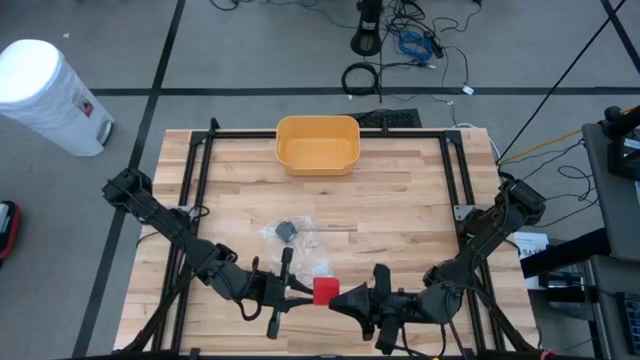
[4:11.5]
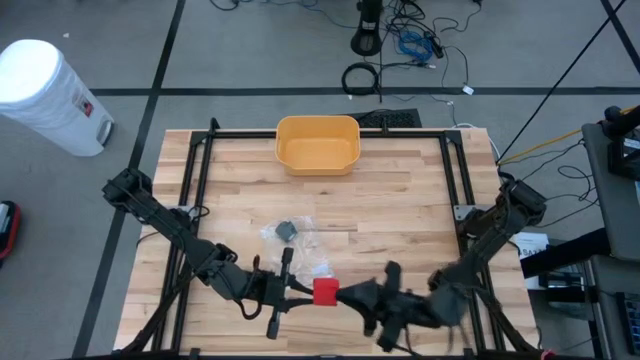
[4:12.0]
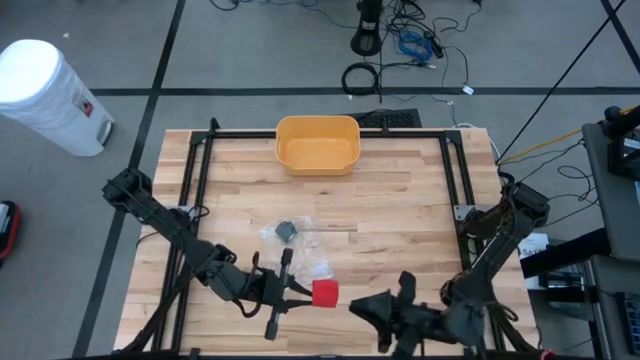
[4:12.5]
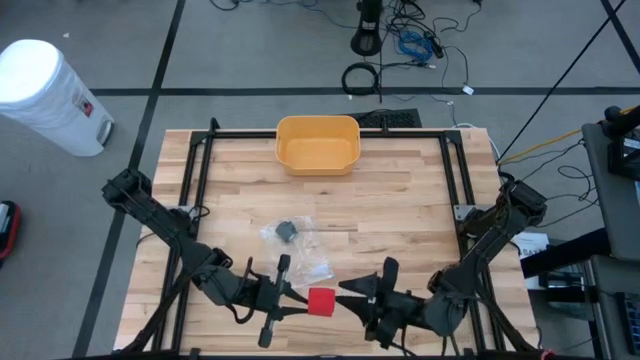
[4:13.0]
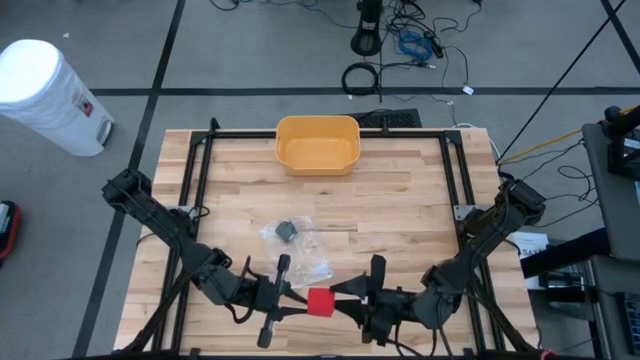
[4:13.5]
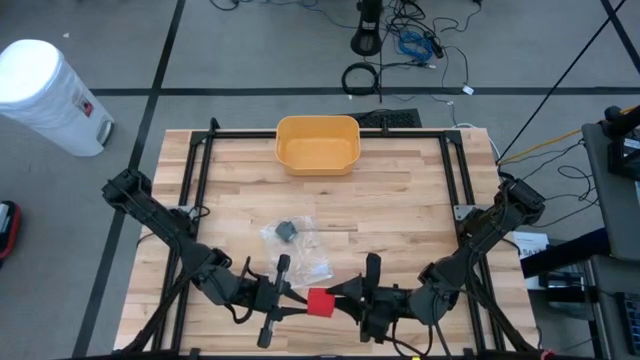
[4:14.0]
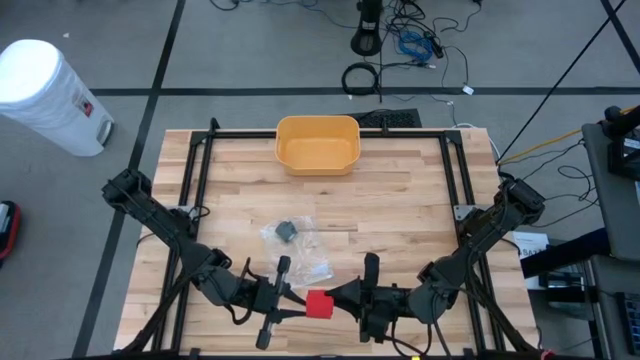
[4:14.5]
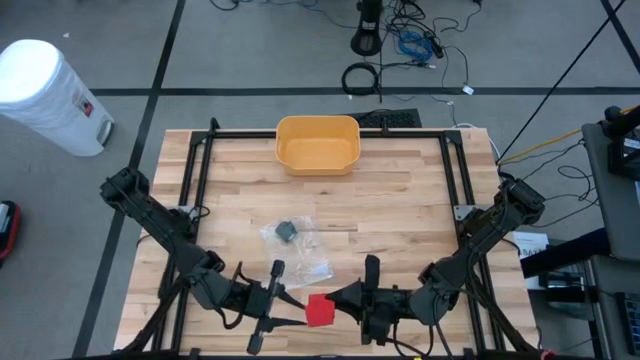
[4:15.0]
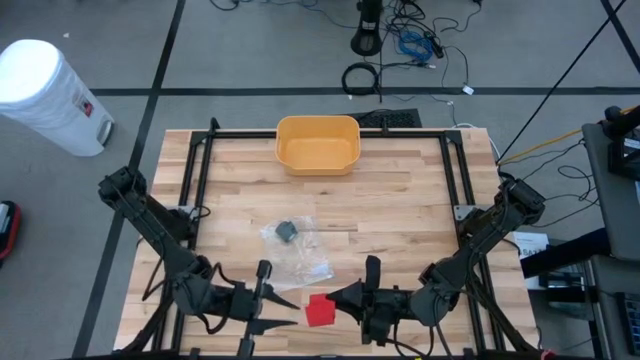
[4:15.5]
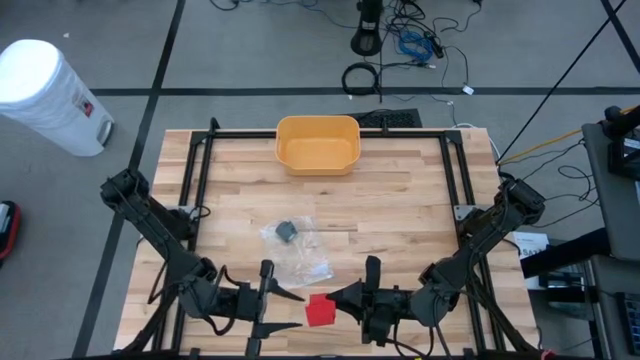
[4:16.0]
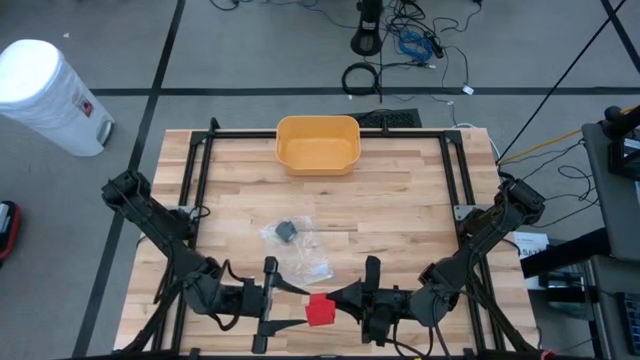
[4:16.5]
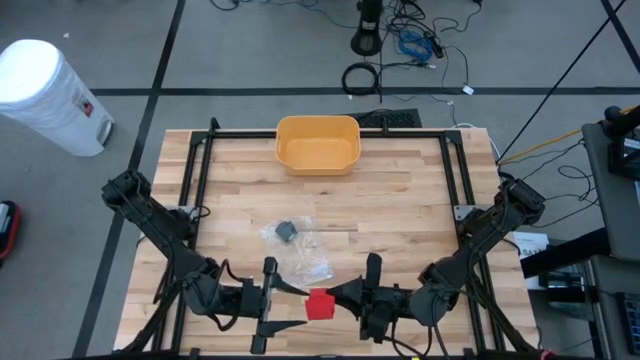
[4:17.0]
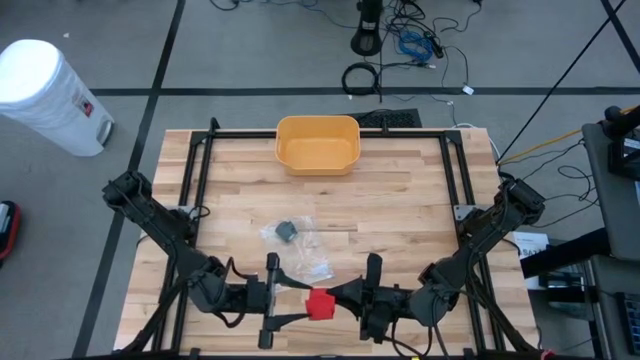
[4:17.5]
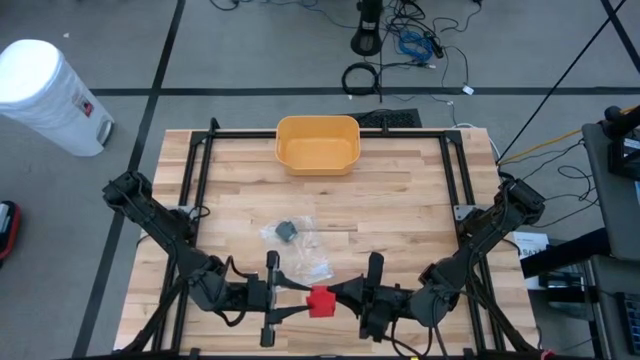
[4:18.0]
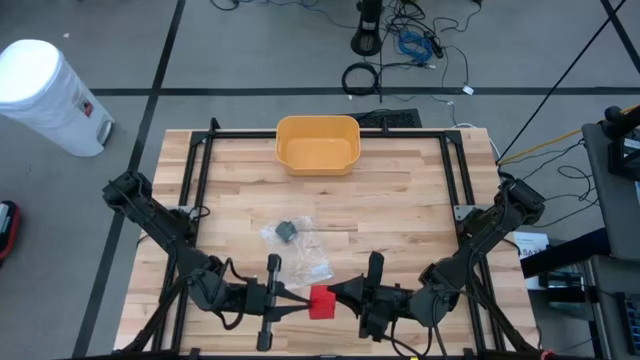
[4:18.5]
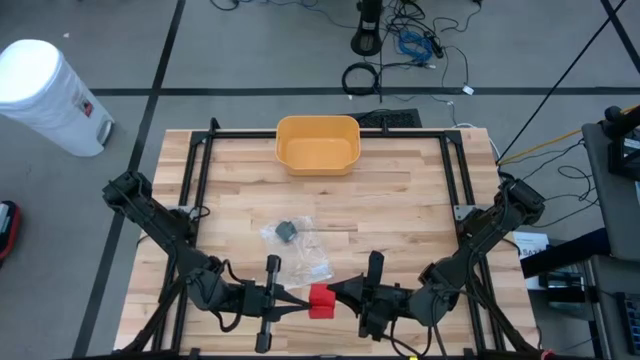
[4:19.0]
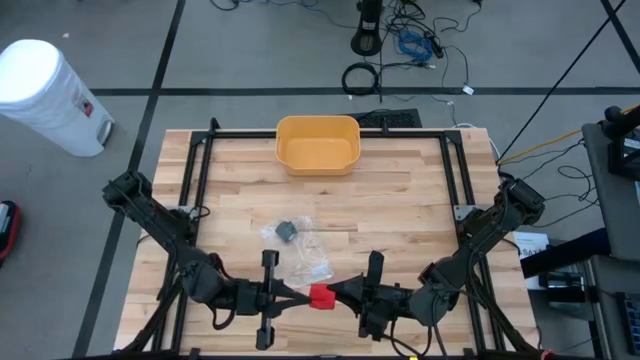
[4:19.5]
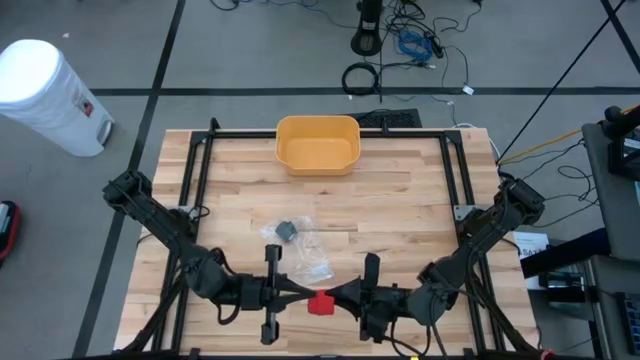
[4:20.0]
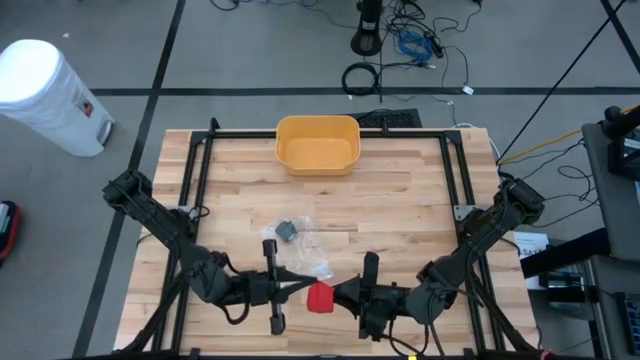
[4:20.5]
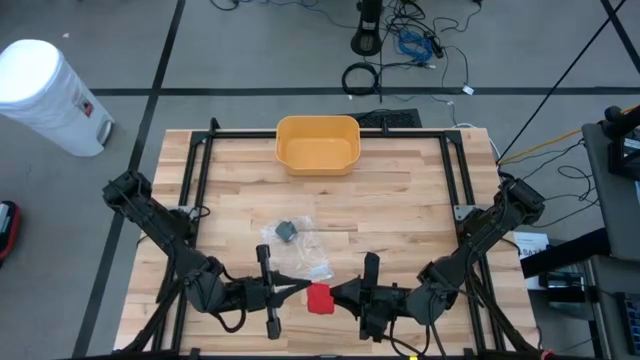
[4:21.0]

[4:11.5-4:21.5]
Task: Roll bandage
Roll the red bandage

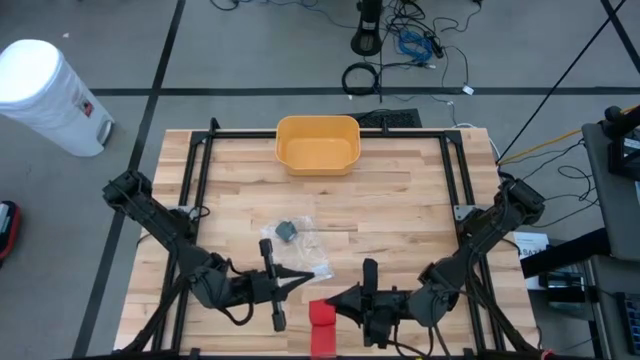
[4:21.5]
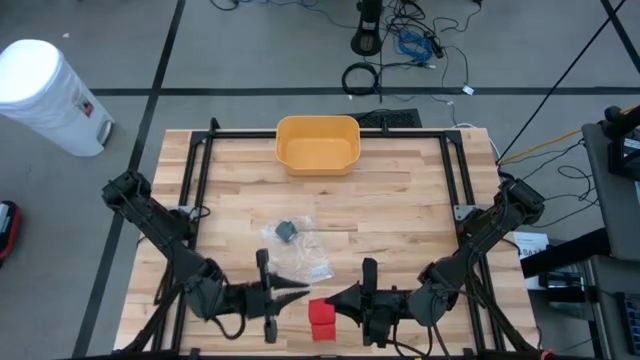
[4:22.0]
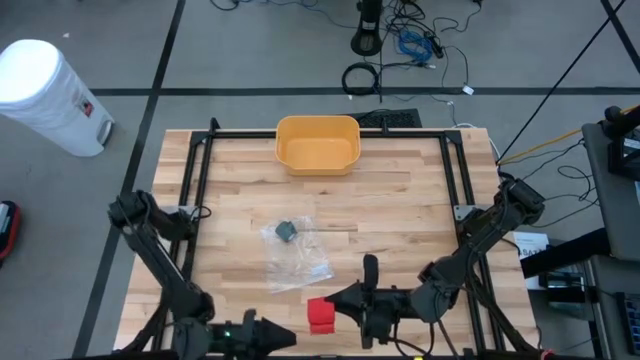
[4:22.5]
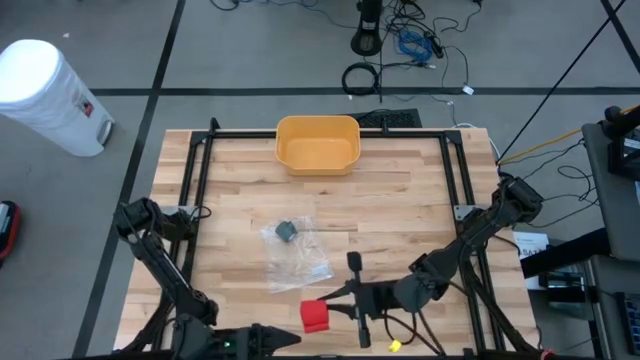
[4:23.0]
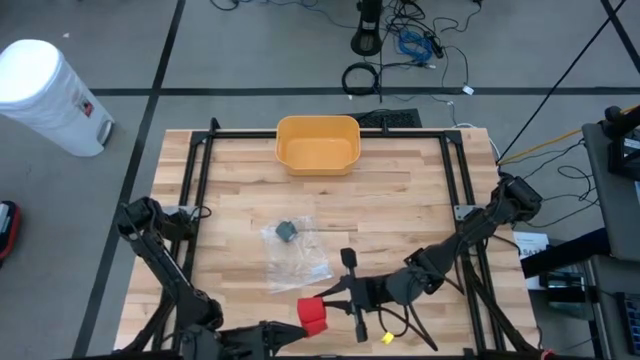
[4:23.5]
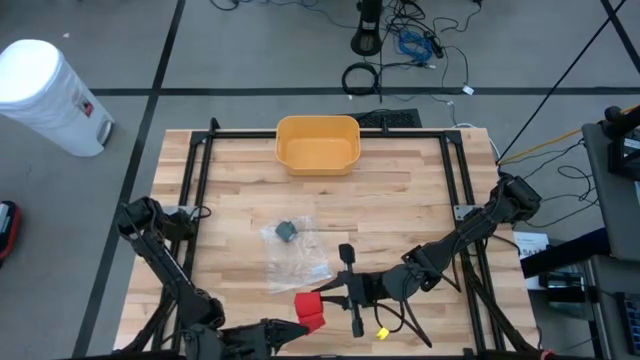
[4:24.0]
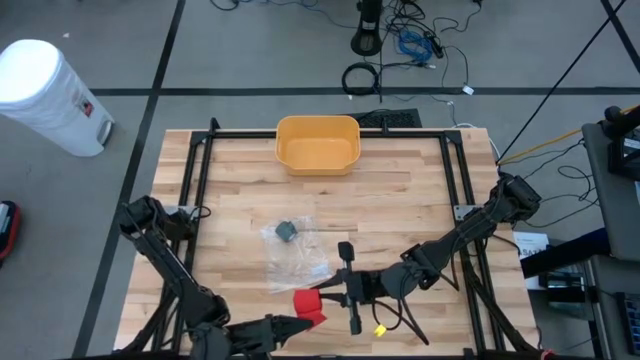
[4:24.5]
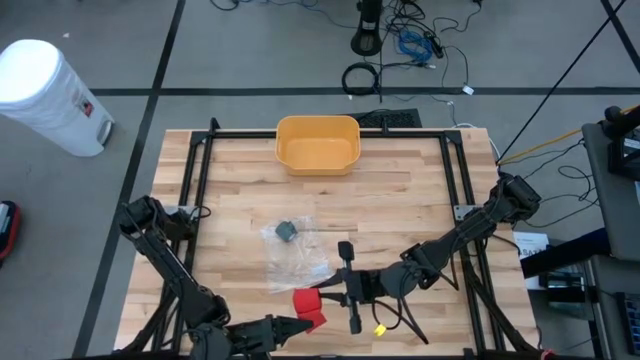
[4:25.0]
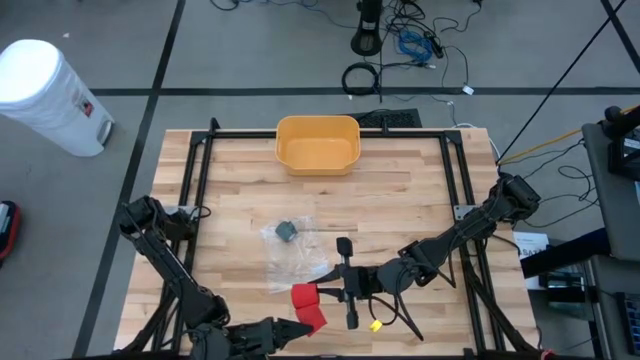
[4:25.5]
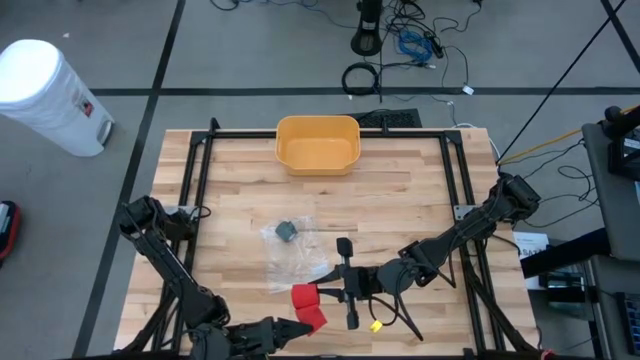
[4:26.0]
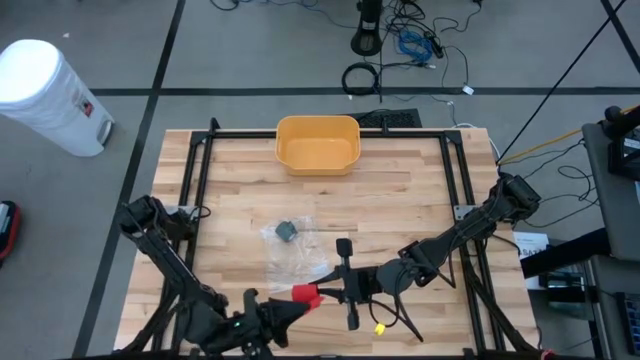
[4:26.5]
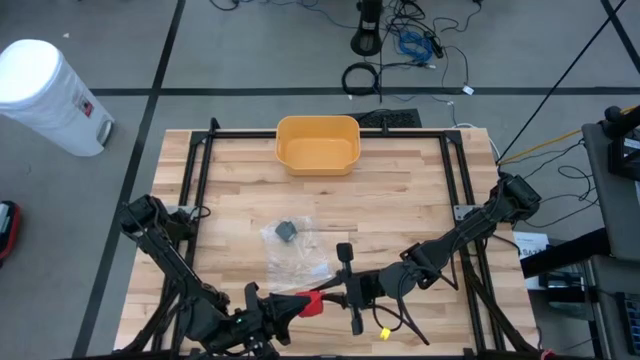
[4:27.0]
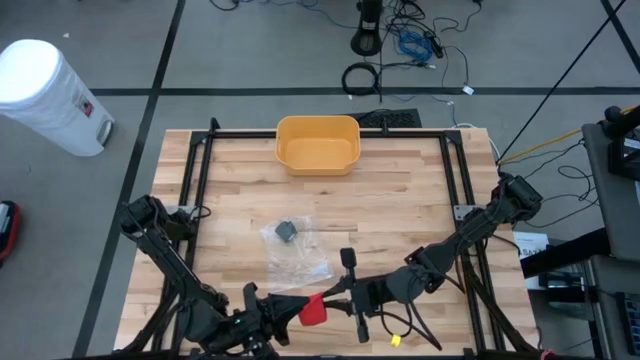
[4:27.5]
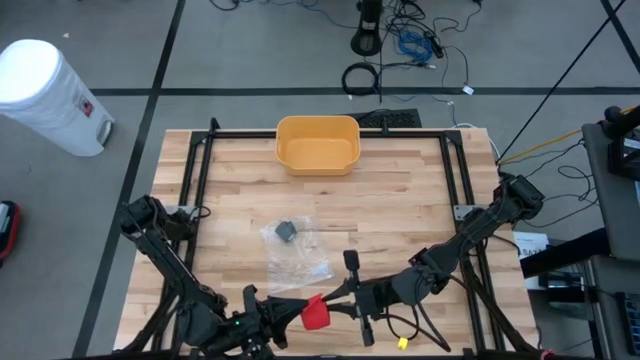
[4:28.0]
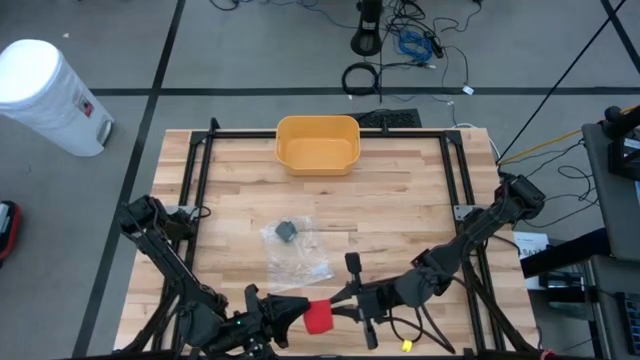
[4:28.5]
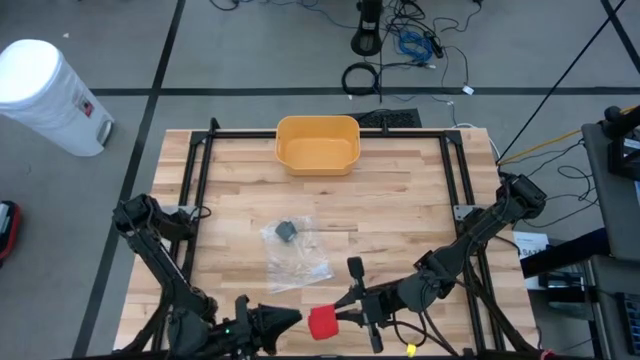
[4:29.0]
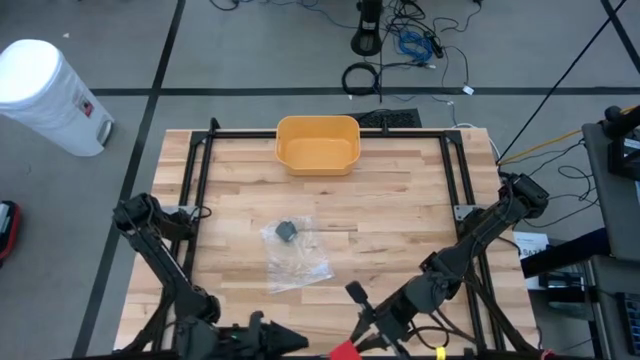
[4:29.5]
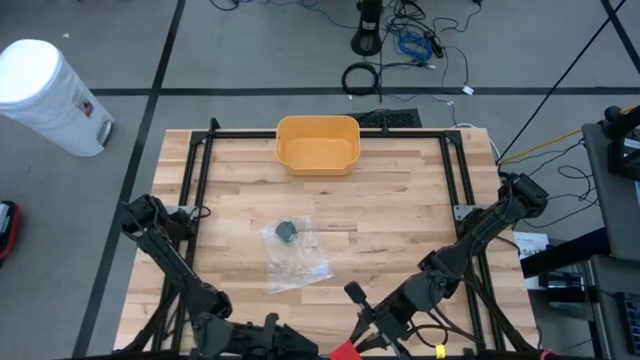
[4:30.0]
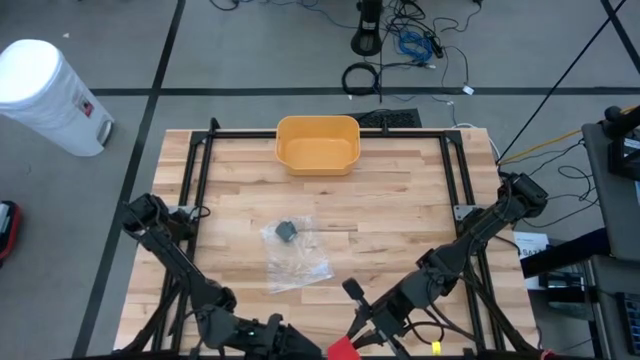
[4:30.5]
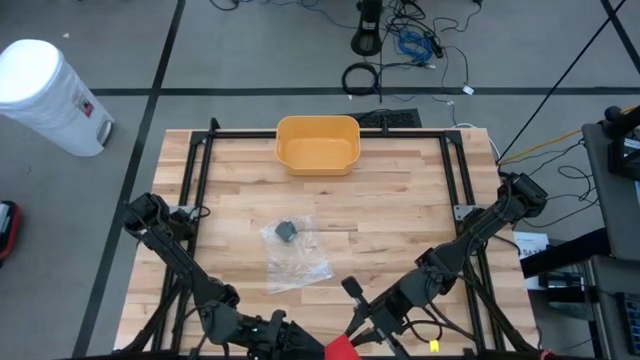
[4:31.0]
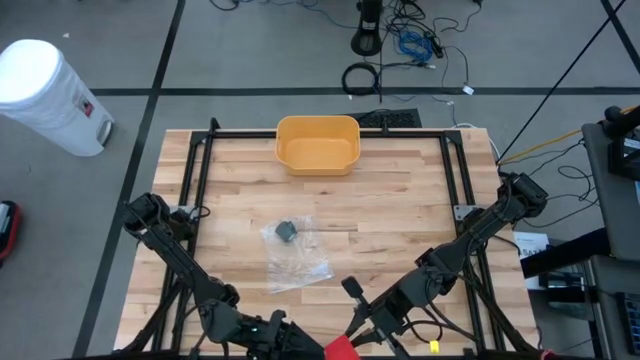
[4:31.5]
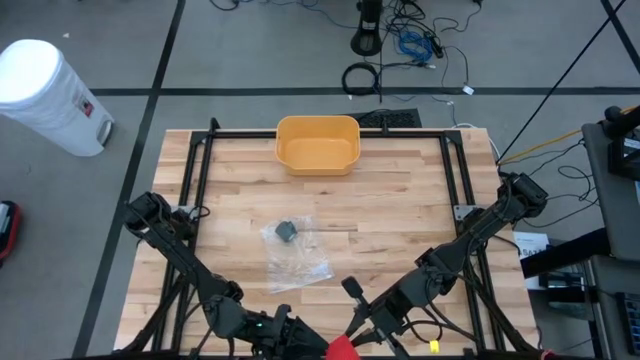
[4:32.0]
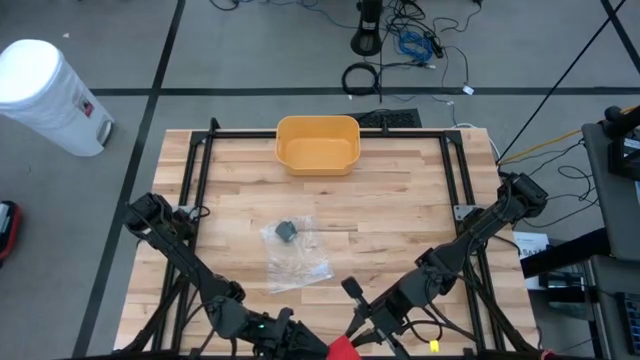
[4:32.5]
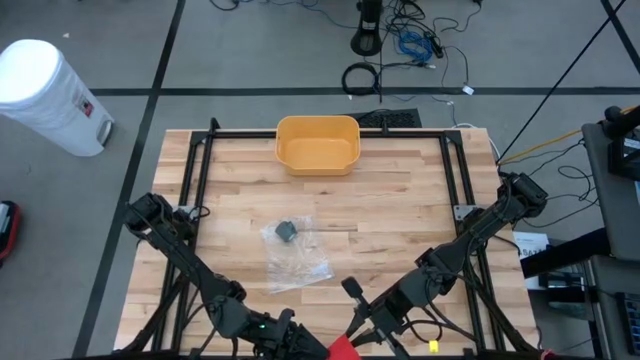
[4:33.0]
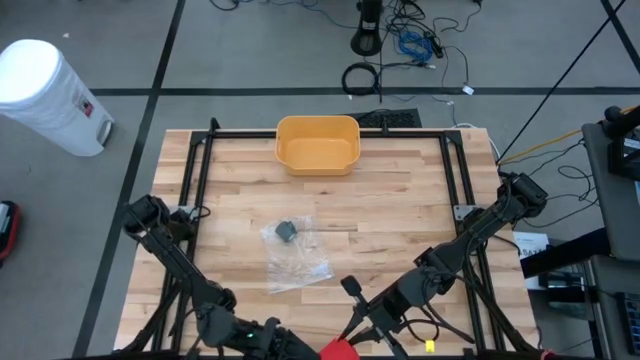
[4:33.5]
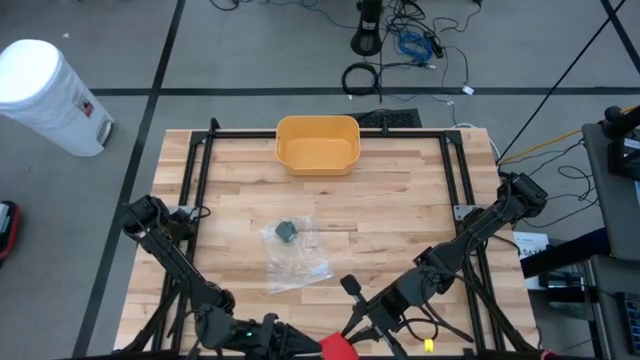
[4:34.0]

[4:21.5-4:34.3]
Roll the red bandage
